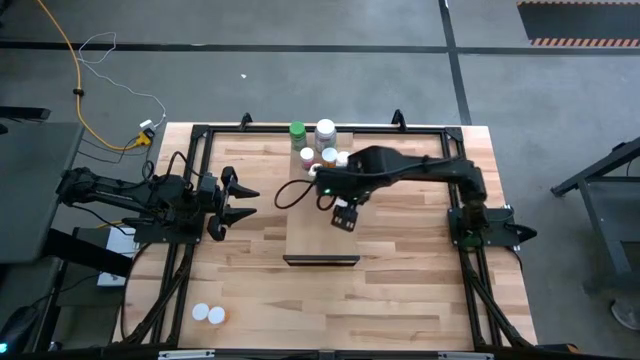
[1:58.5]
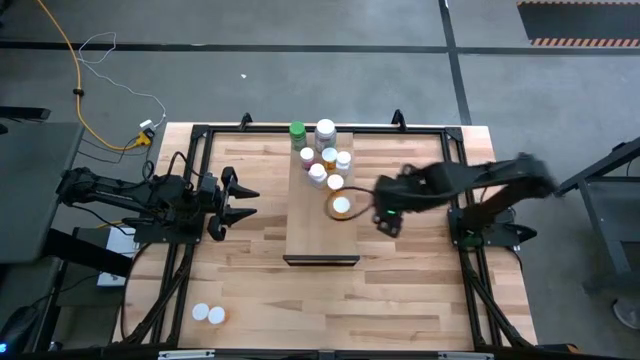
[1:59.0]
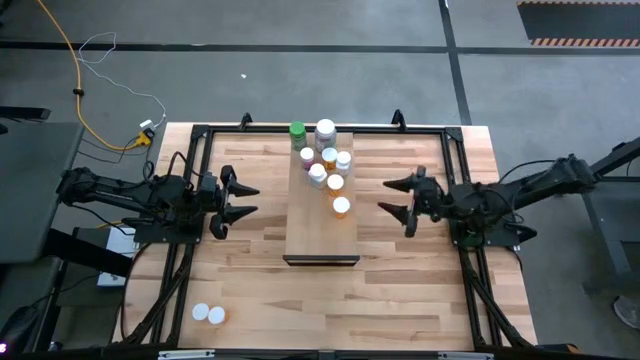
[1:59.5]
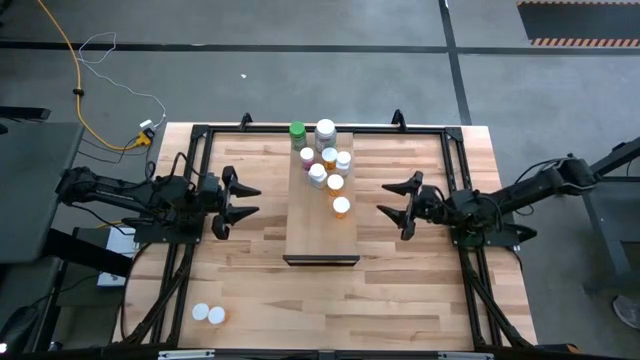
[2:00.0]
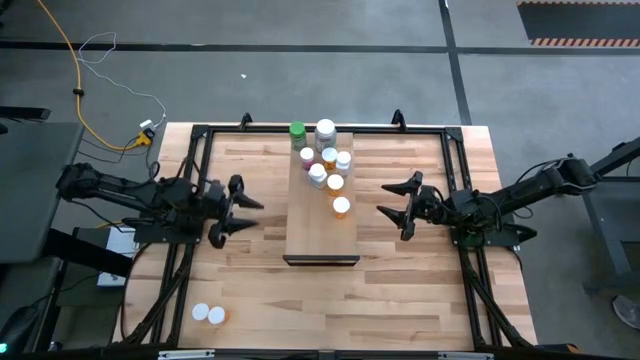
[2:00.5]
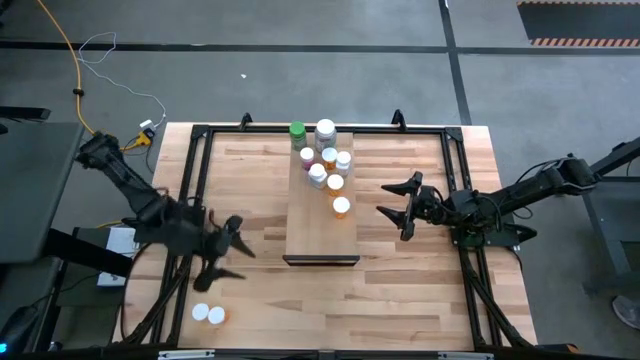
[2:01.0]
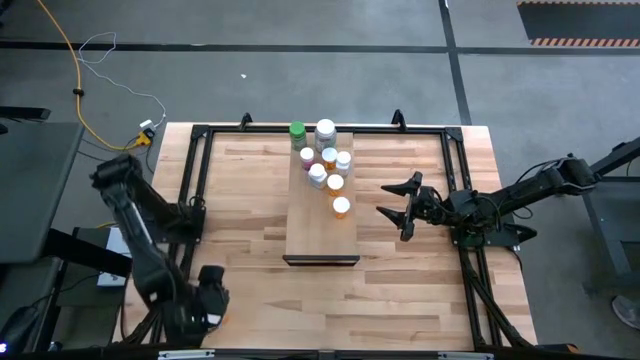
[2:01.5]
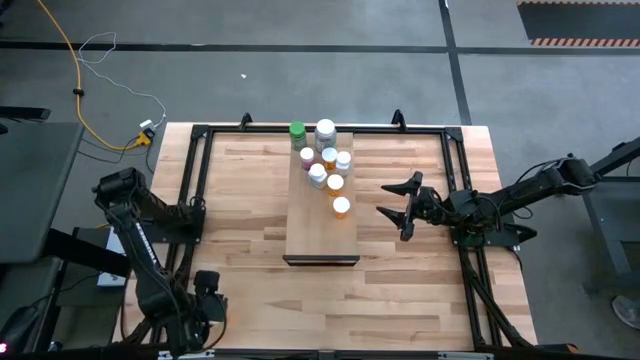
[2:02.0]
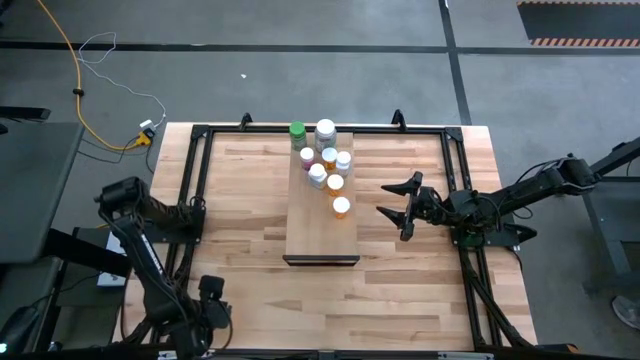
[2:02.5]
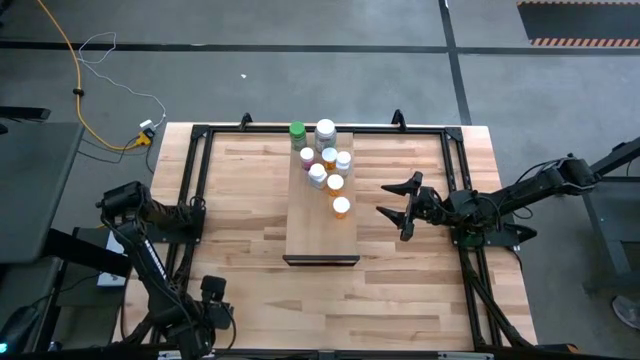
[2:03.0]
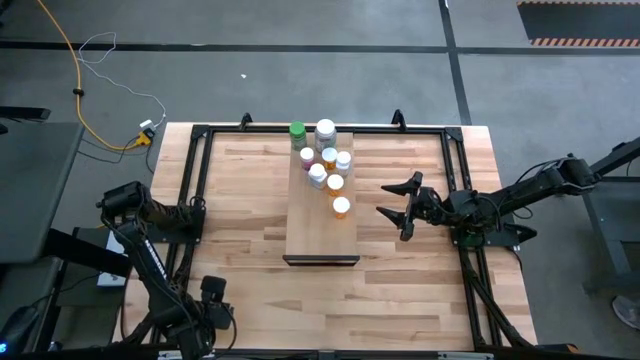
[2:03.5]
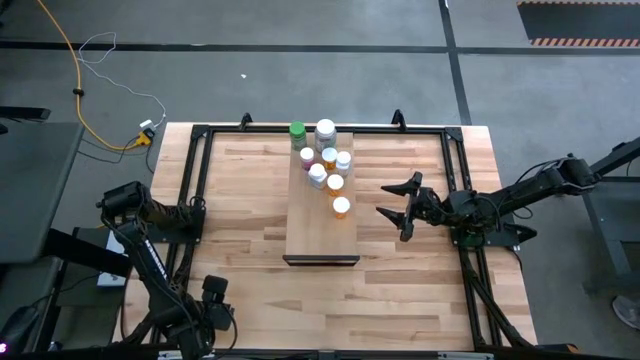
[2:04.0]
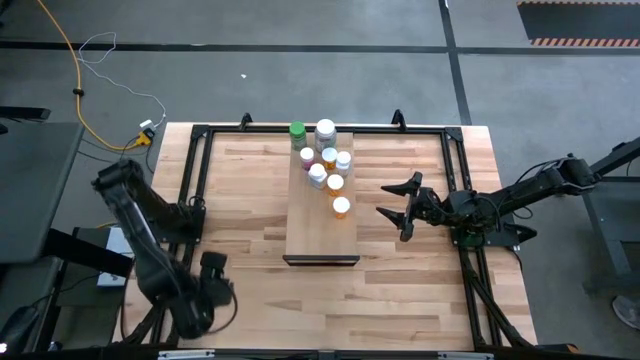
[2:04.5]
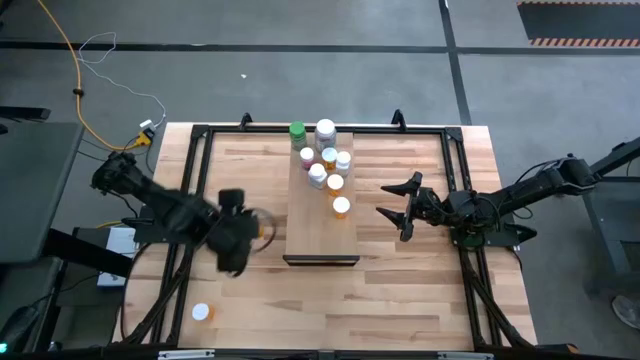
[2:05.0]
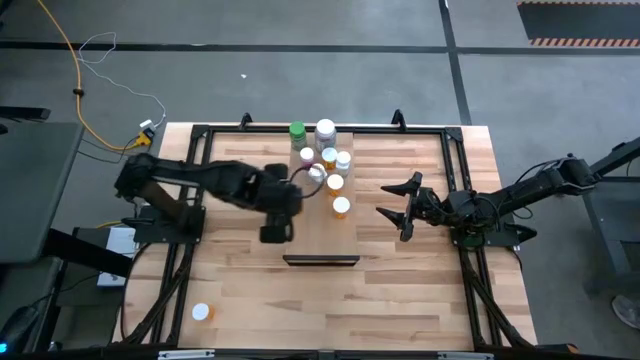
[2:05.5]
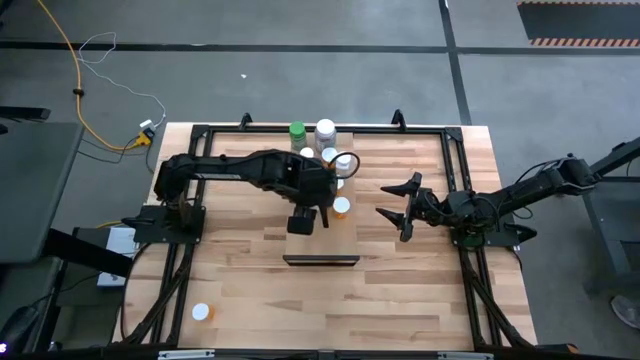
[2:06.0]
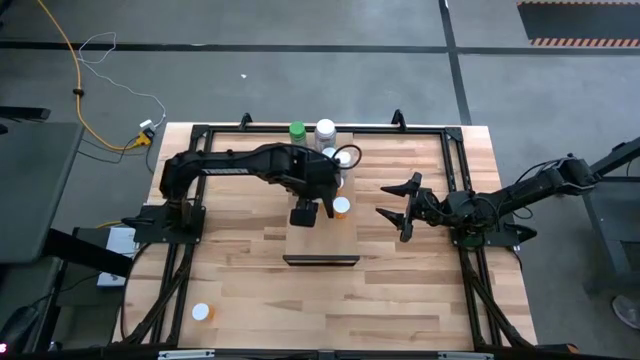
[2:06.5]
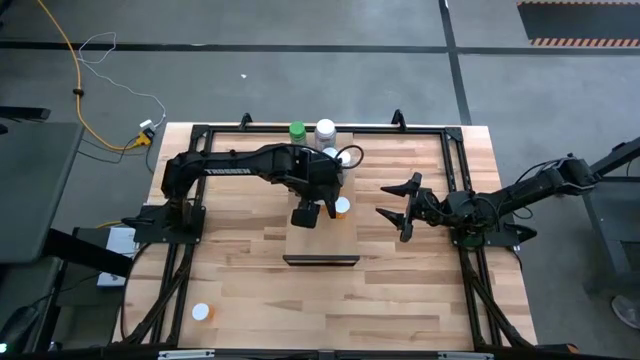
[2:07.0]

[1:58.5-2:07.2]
Task: Pick and place medicine bottles onto shelf by color
Put the orange pill bottle on the shelf

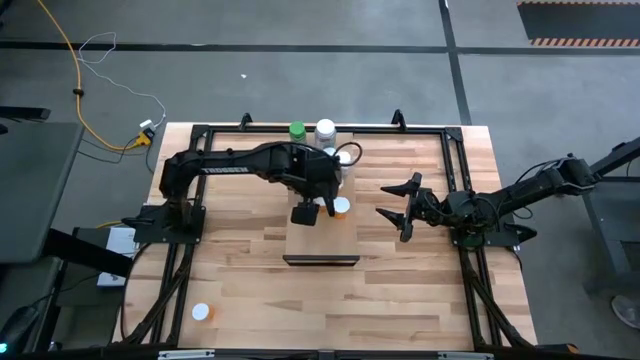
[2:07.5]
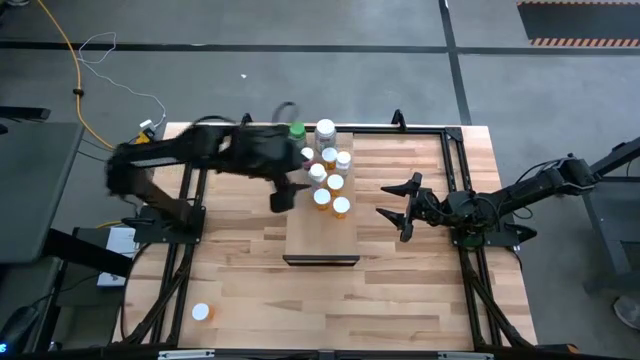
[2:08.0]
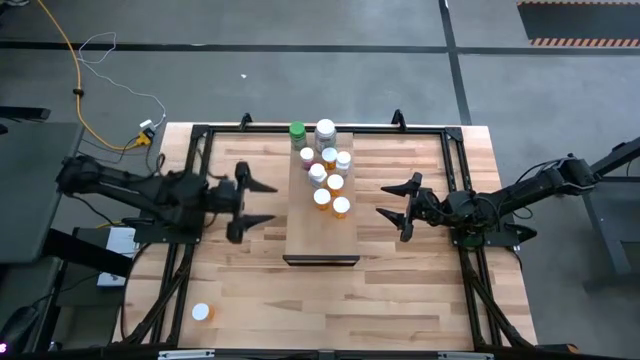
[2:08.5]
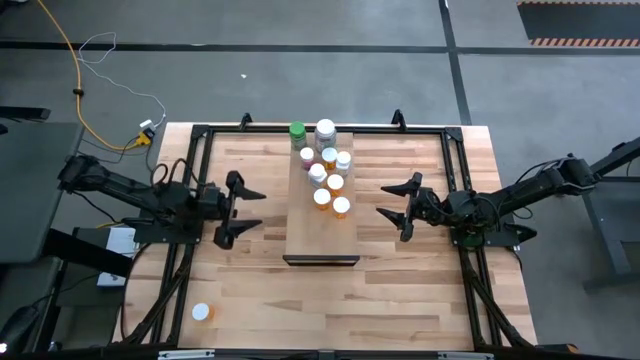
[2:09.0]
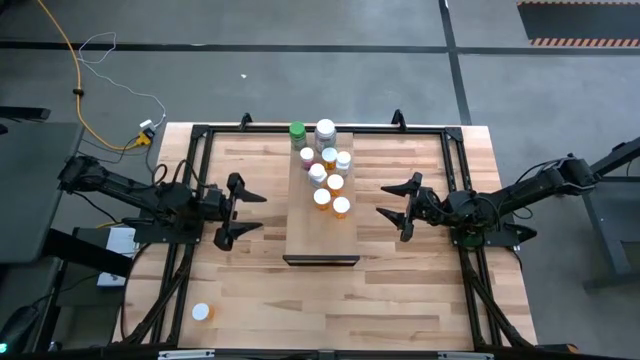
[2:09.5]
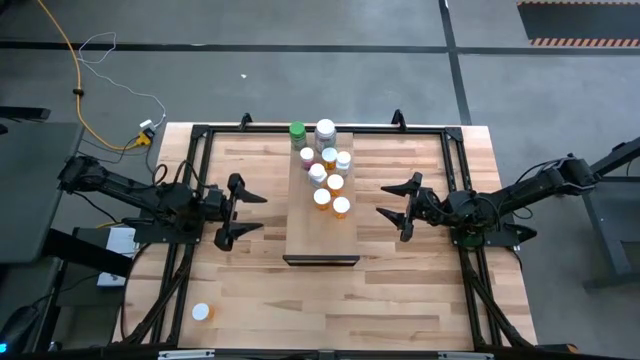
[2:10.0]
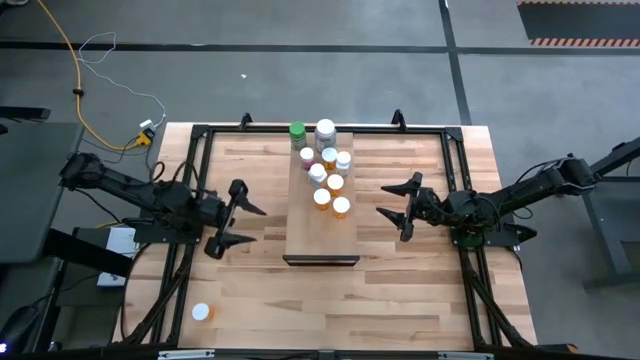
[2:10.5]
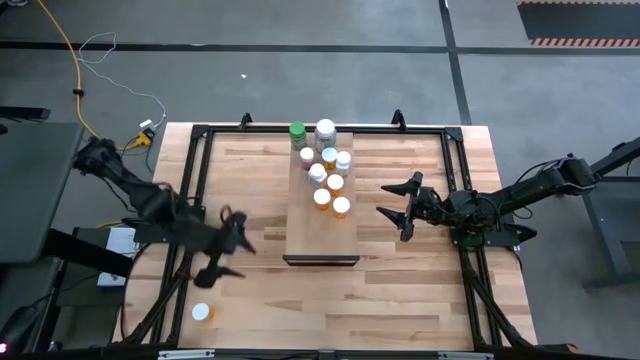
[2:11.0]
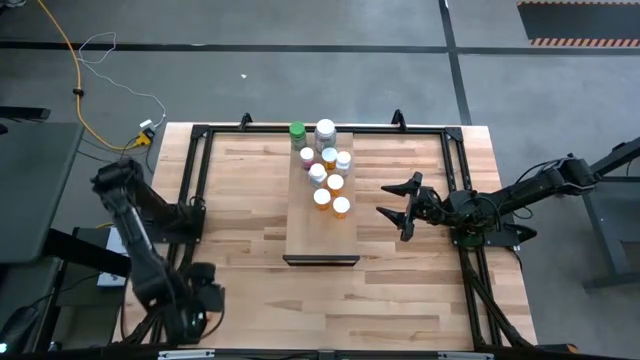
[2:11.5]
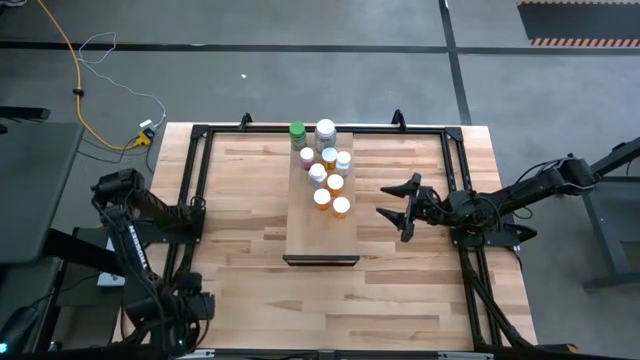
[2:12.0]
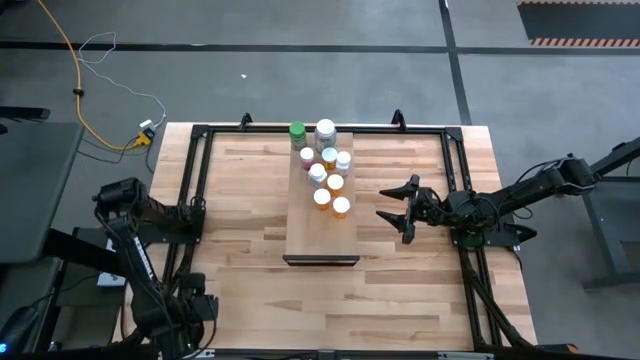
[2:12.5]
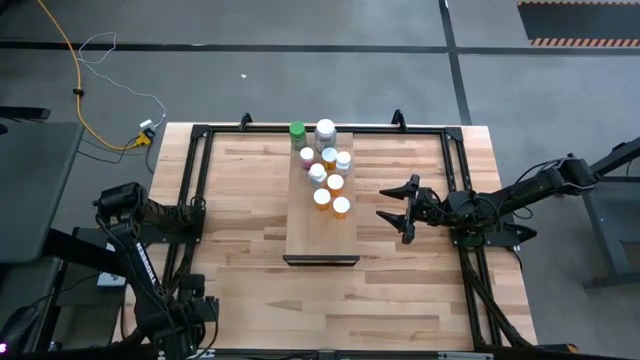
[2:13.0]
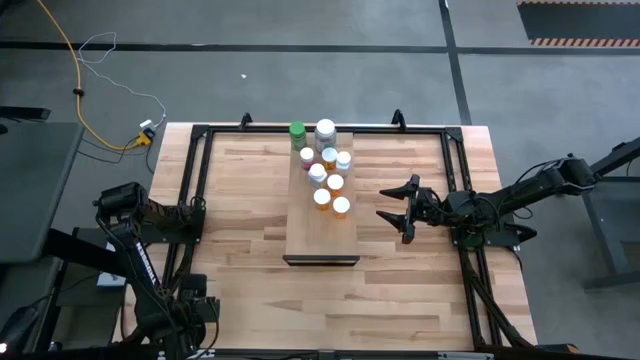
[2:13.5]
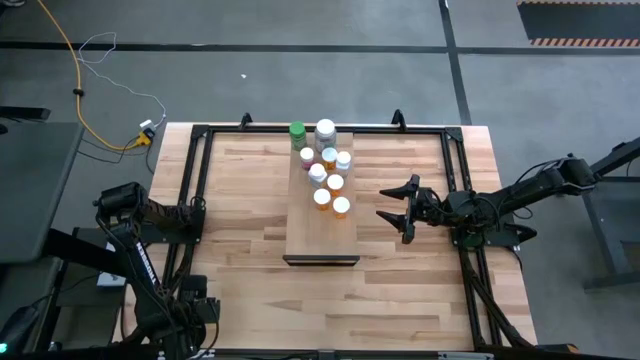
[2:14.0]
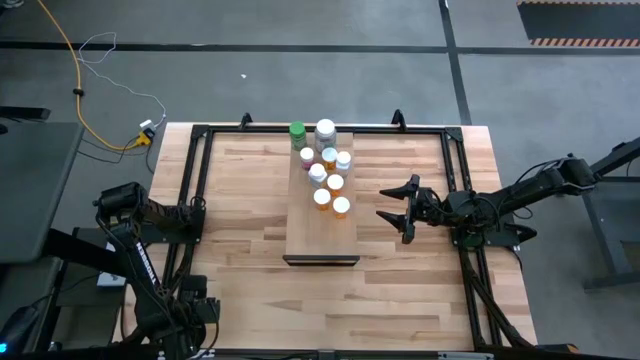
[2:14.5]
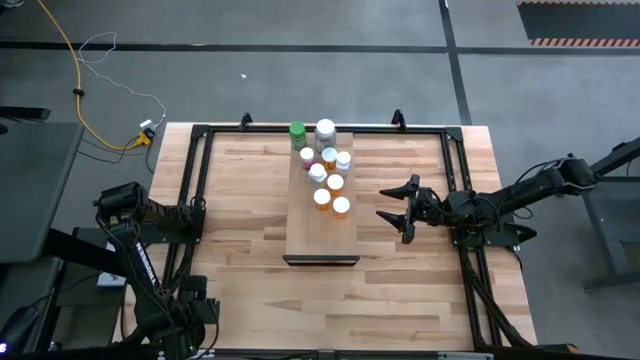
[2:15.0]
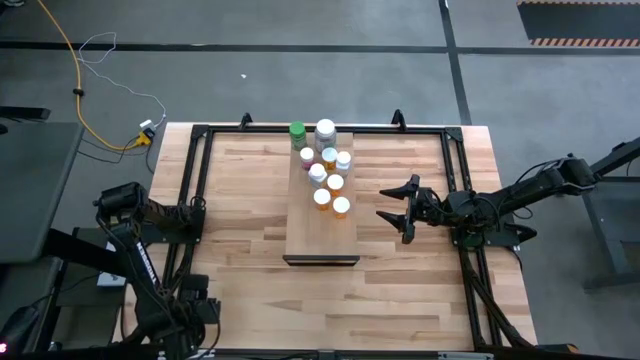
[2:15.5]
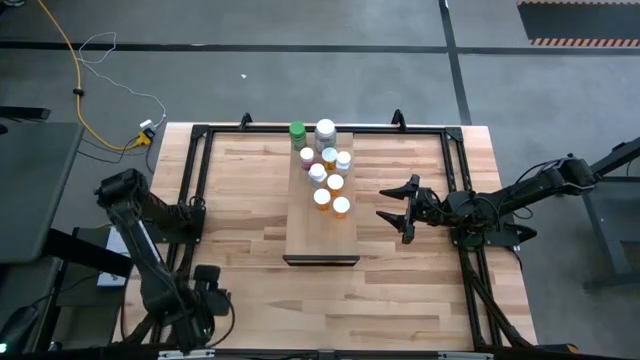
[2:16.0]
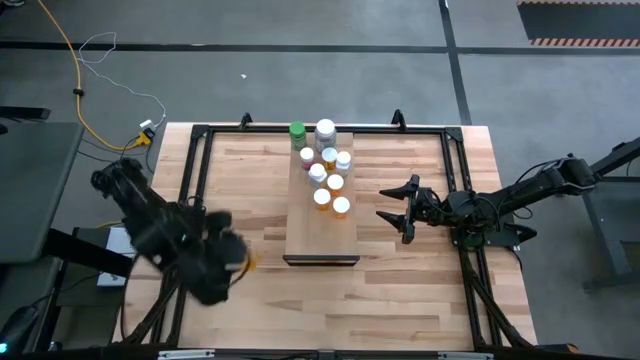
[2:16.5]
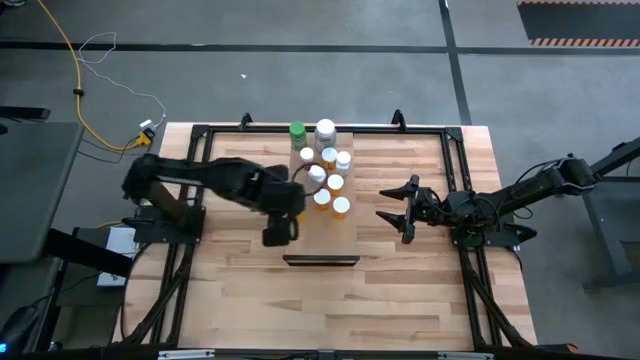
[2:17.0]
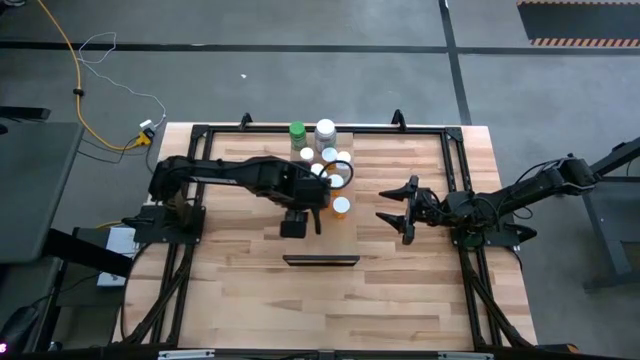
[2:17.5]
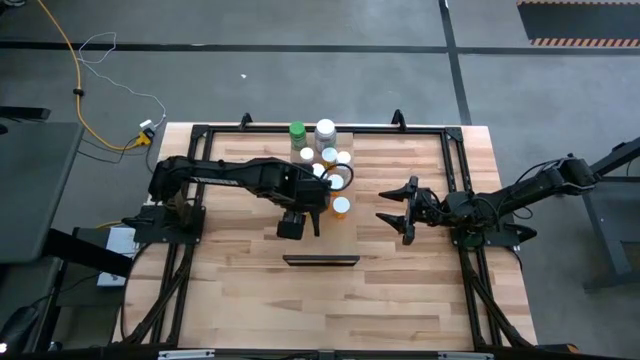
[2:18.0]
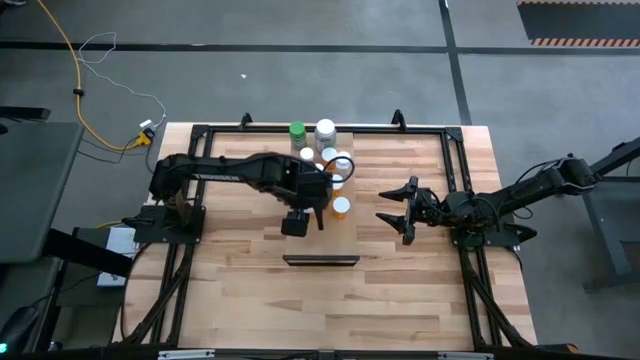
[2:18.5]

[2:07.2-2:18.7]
Put the orange pill bottle on the shelf
